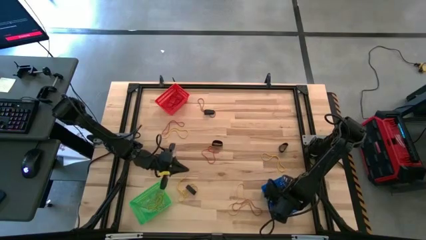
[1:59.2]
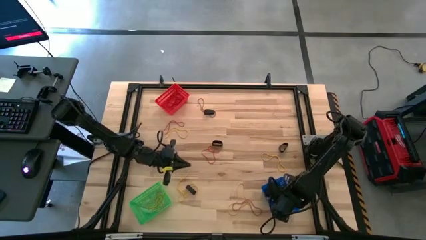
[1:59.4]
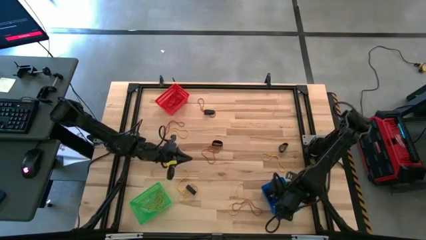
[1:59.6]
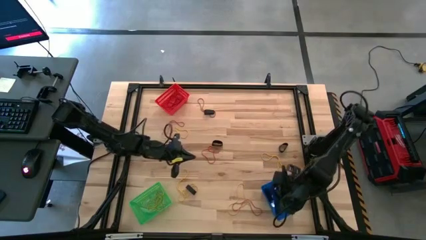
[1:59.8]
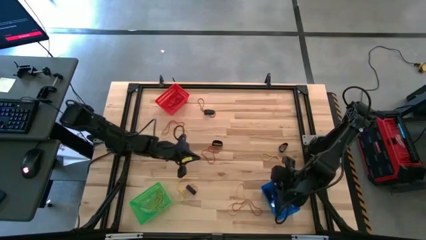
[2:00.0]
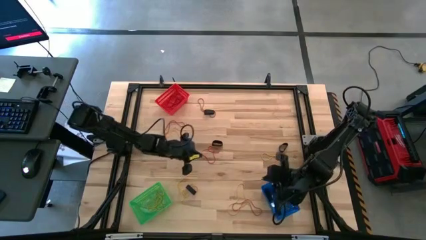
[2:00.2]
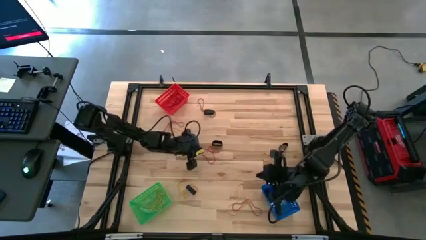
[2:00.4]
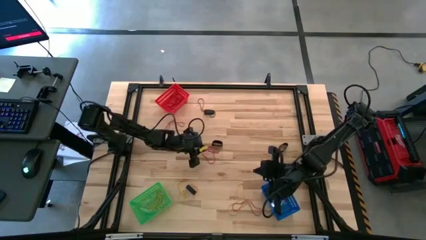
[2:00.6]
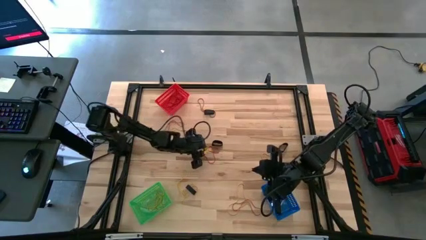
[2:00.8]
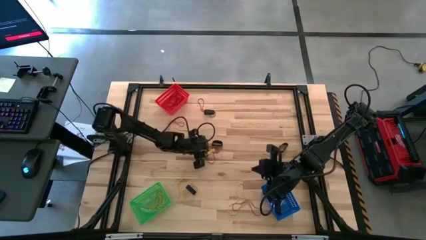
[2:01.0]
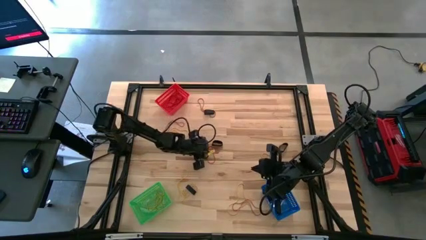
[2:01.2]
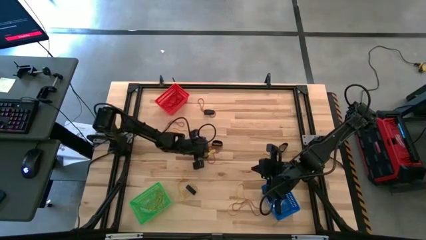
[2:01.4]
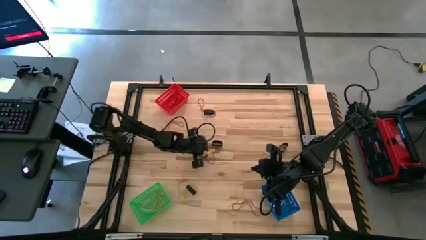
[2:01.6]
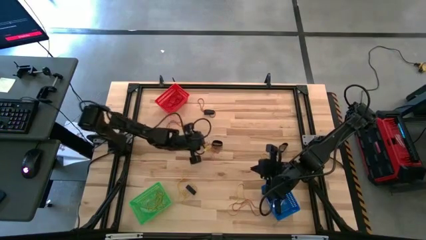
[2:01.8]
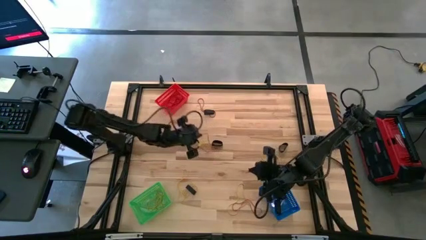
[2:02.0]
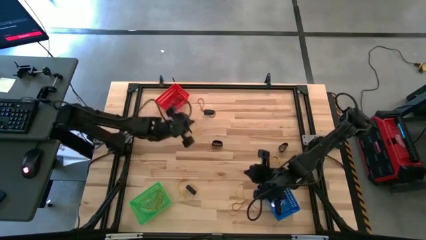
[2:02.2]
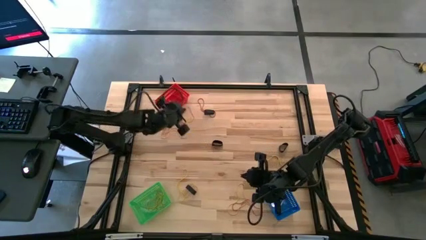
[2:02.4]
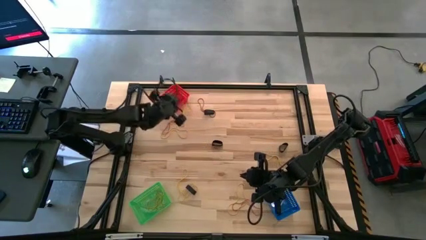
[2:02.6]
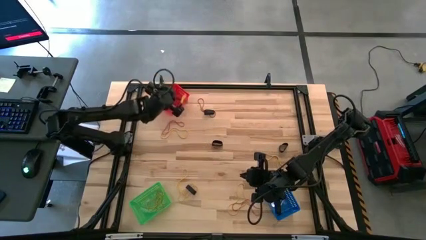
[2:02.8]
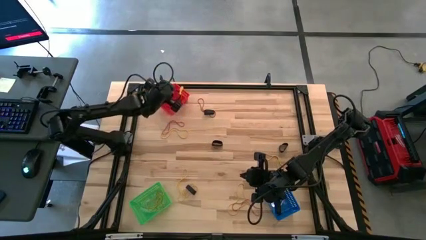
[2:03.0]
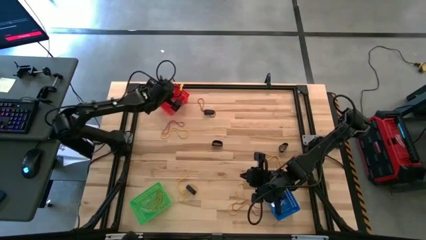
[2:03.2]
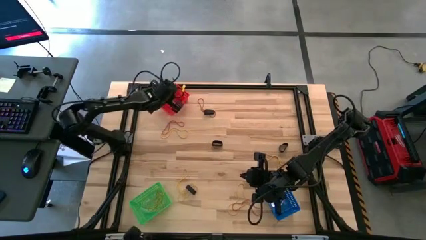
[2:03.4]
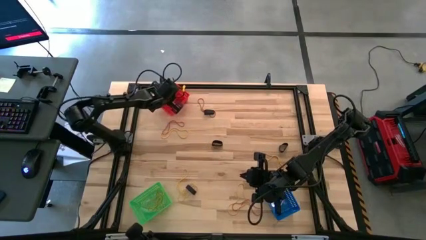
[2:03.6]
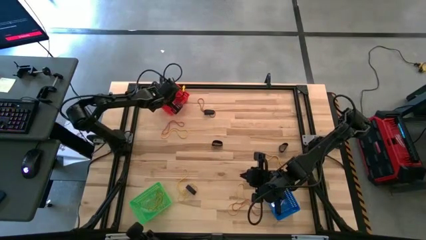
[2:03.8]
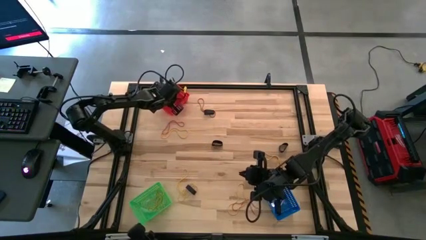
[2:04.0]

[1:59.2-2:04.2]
Task: Sort rubber bands into baskets
Put the red rubber band into the red basket

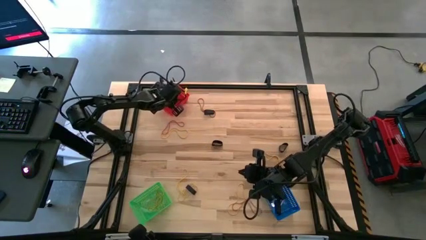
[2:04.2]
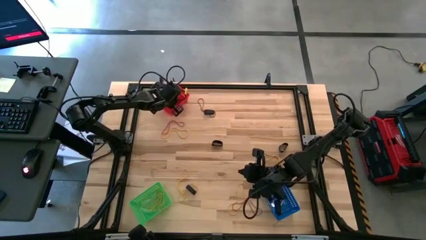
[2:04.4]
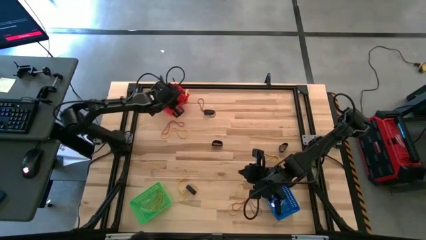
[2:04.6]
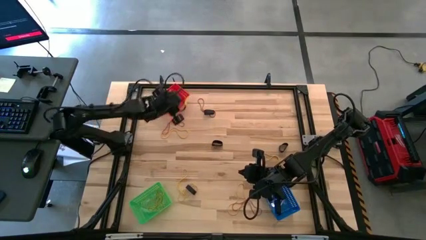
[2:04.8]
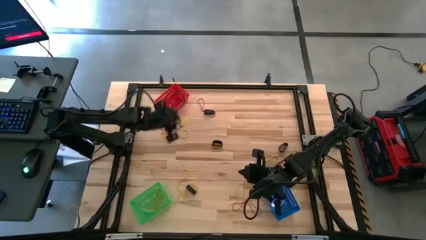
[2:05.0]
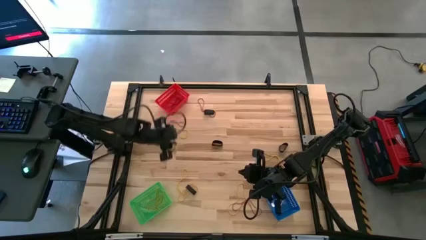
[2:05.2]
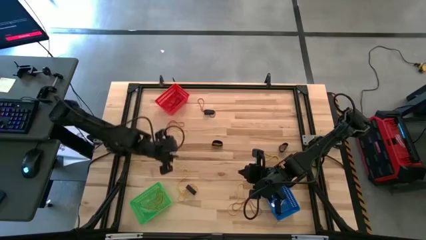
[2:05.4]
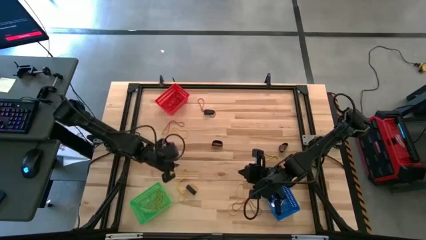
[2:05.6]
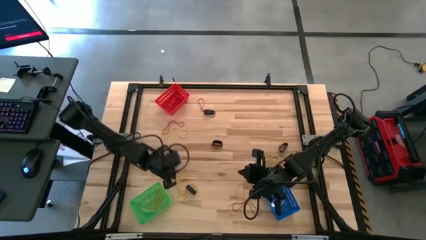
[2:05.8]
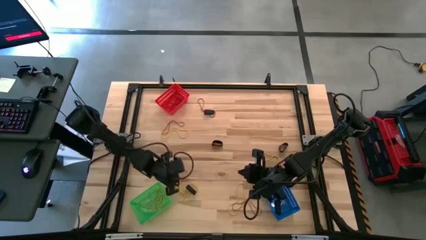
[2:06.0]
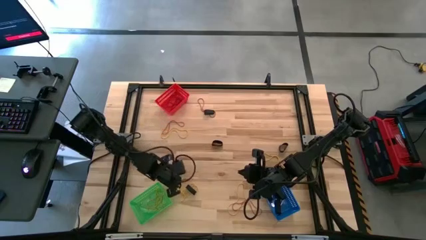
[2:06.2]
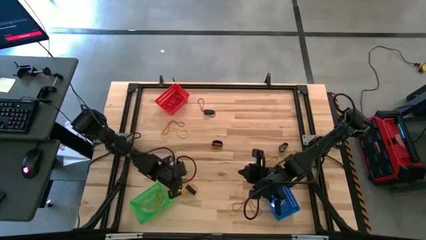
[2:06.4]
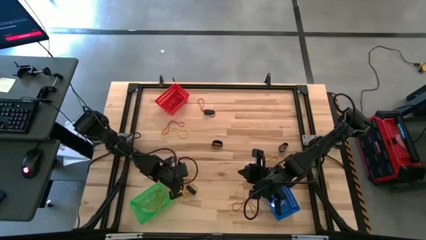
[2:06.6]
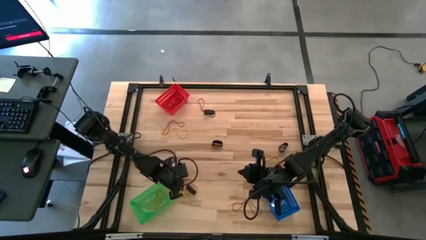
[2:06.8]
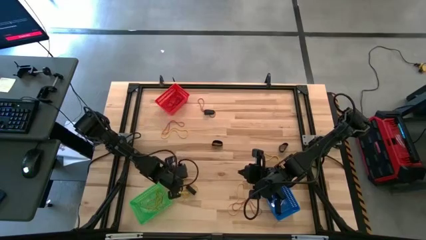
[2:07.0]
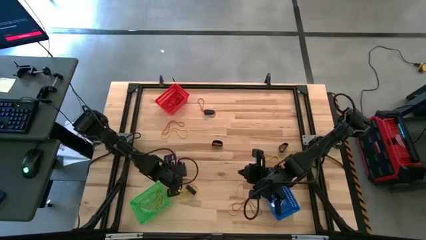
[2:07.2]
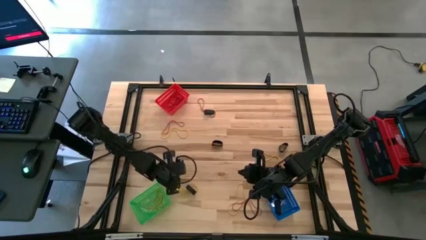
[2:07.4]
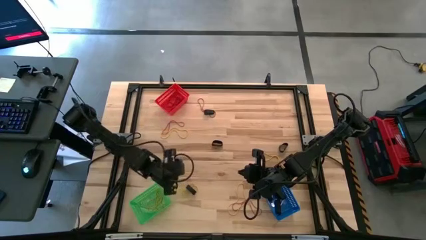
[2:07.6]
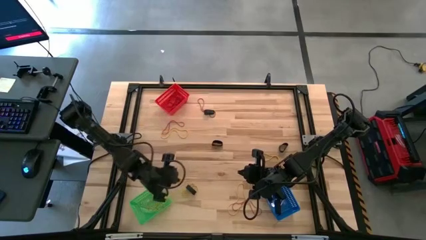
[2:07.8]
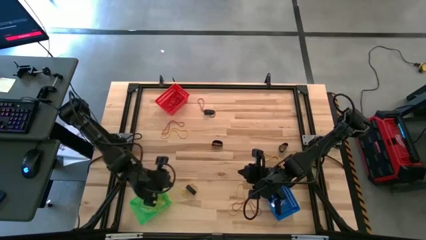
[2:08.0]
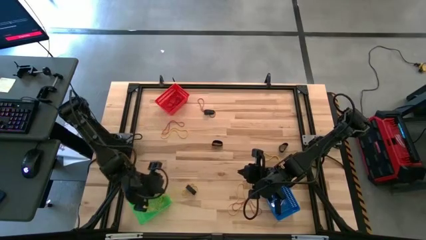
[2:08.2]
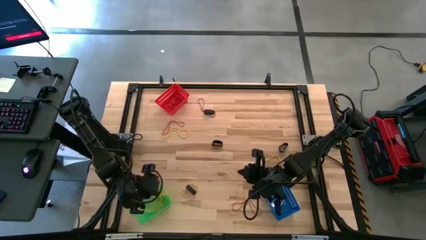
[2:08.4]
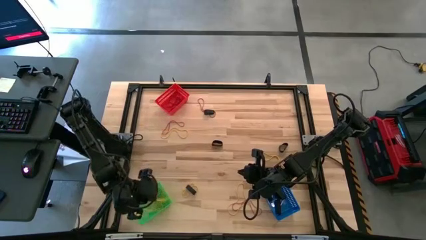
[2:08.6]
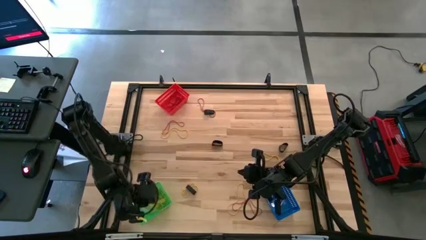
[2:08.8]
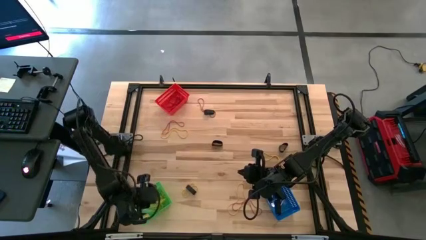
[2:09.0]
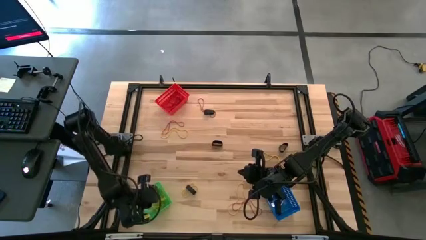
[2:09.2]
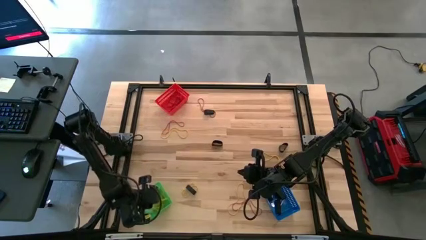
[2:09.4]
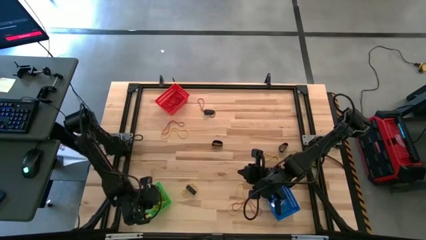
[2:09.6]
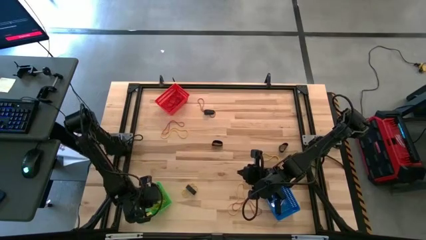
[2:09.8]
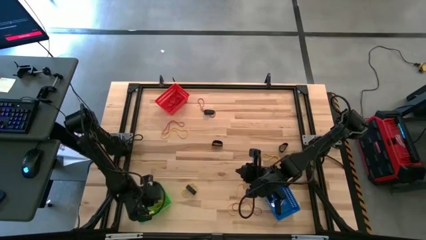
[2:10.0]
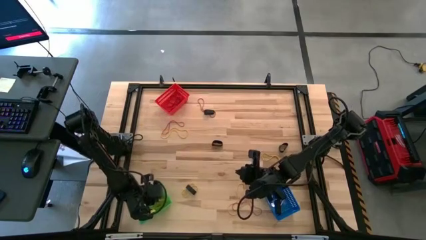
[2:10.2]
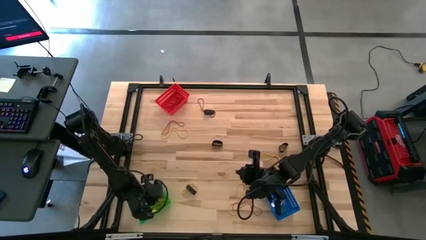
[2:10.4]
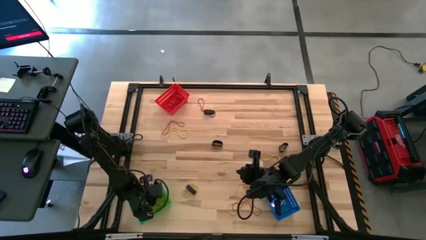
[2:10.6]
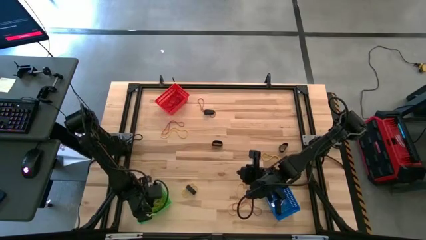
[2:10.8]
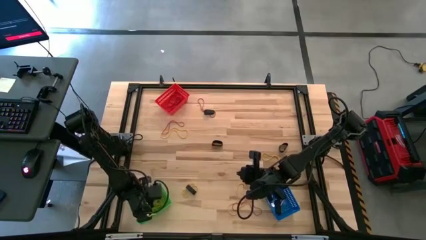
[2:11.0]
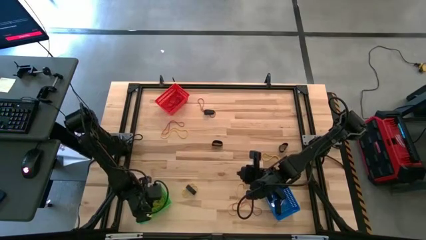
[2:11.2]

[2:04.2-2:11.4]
Put the yellow rubber band into the green basket

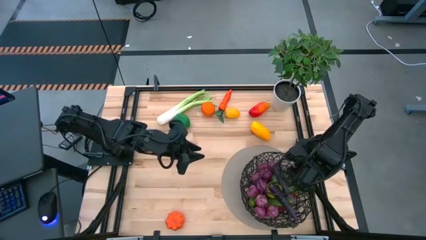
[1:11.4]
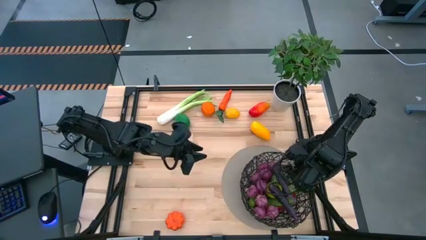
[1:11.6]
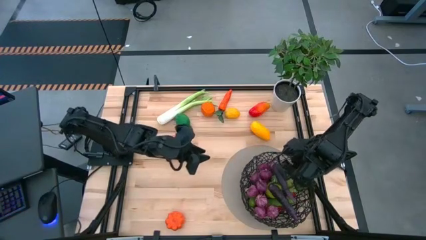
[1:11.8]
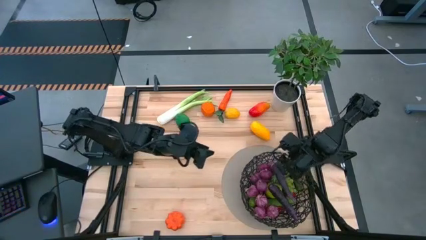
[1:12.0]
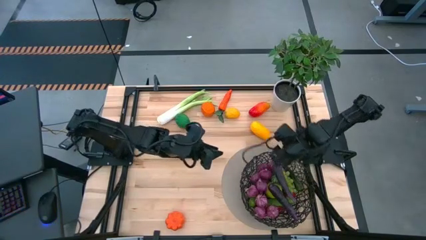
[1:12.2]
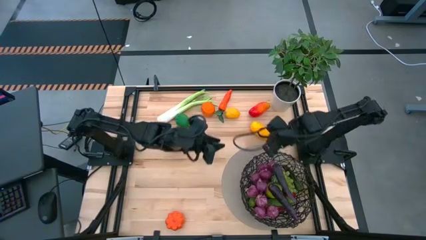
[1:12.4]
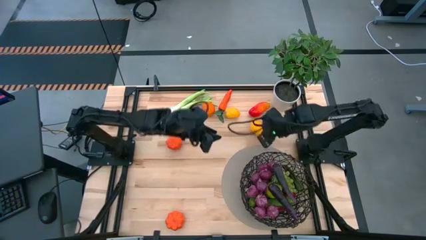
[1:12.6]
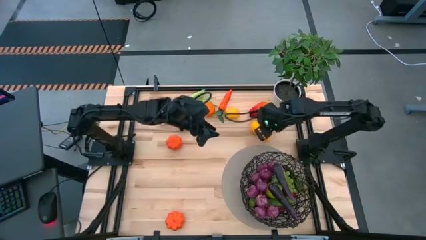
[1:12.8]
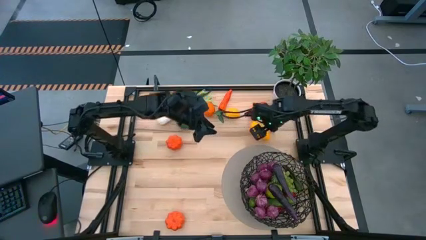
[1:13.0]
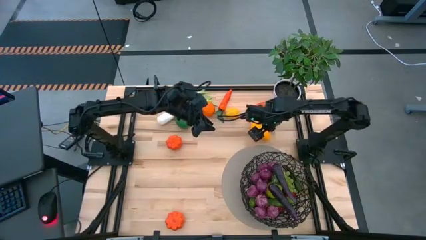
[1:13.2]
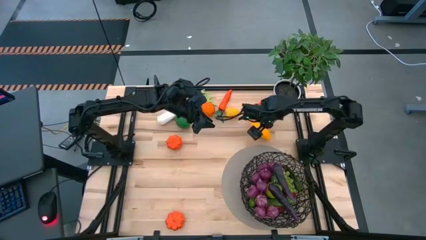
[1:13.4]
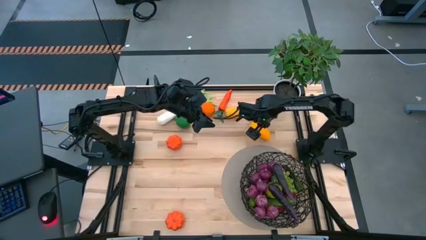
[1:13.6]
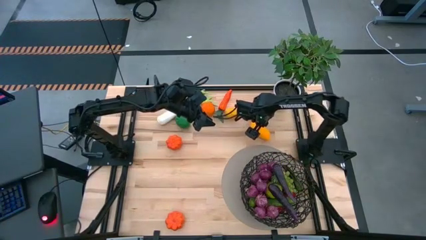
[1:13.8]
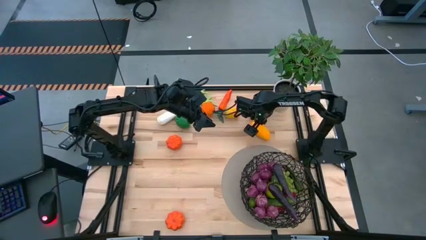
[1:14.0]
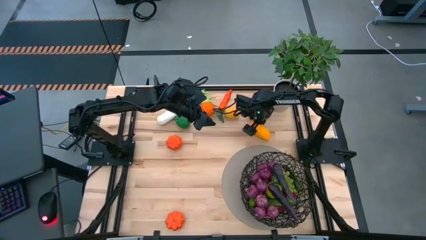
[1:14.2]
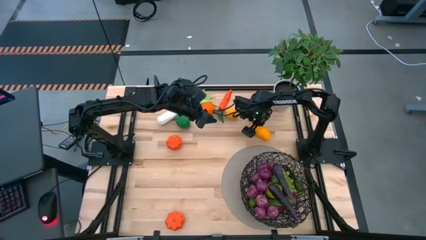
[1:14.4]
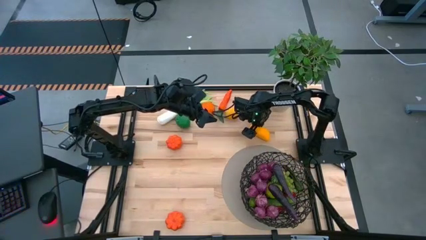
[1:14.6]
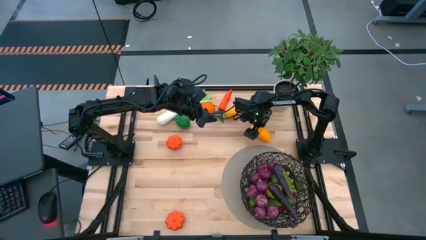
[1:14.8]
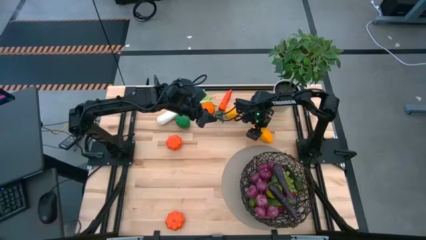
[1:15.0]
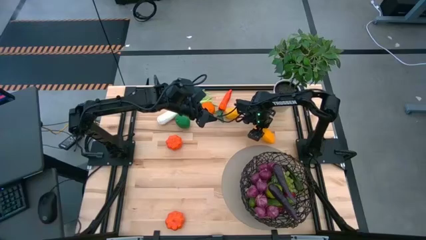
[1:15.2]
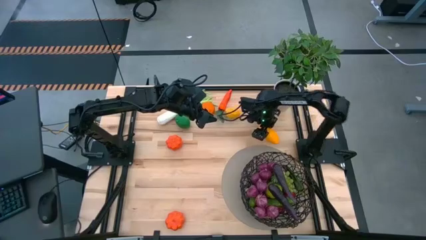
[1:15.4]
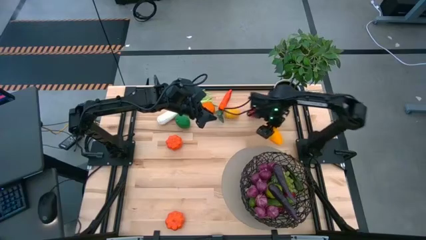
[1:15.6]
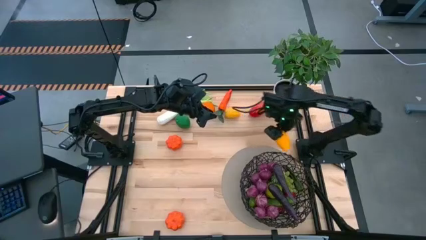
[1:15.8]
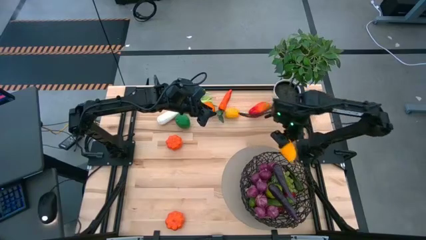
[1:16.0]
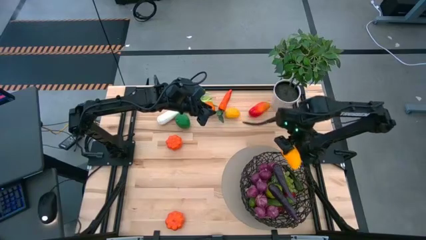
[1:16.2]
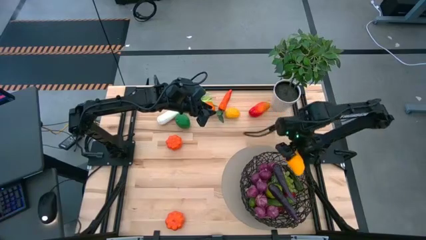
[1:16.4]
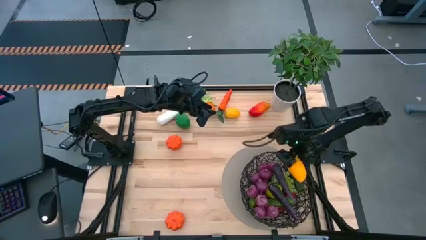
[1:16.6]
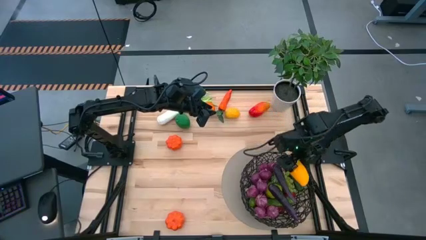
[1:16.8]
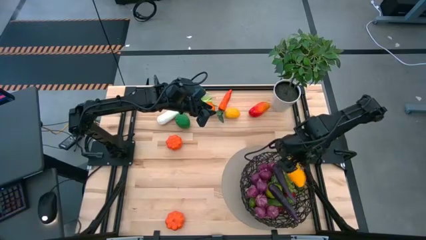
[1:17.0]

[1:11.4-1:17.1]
Task: Build produce basket
Put the yellow mango into the black basket
